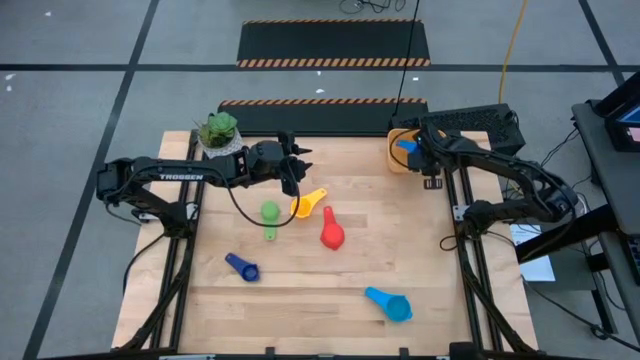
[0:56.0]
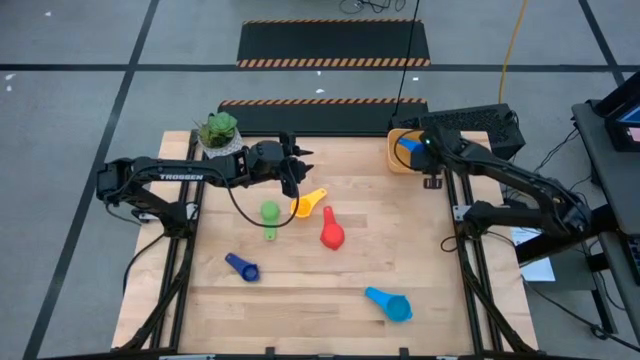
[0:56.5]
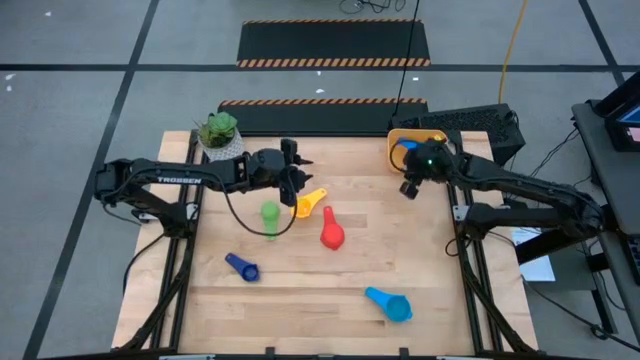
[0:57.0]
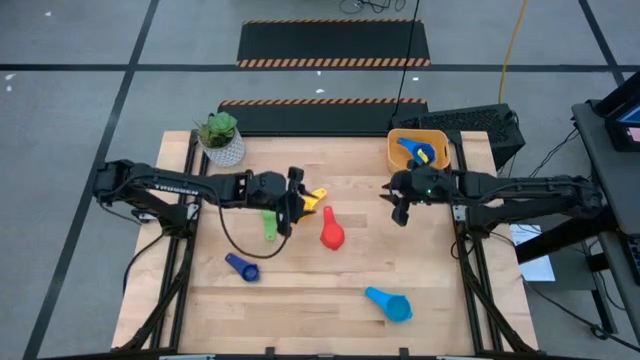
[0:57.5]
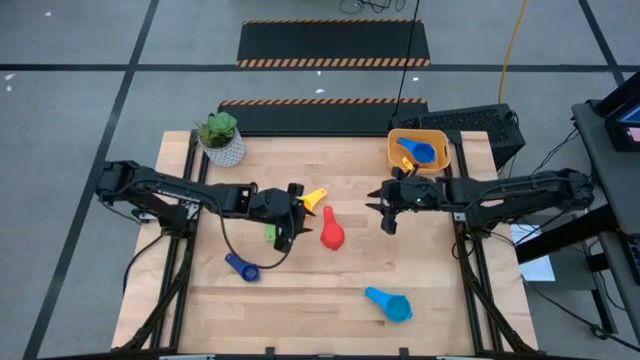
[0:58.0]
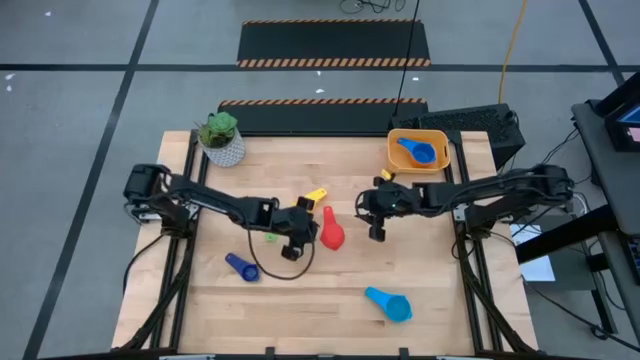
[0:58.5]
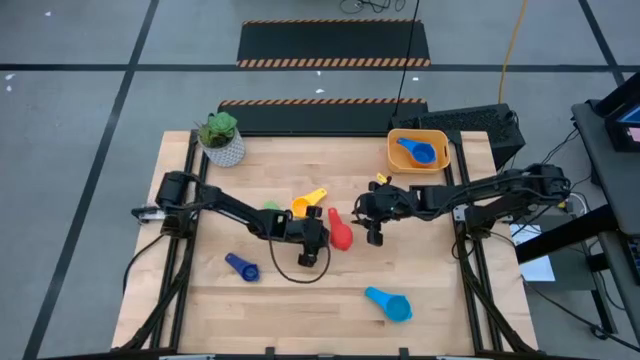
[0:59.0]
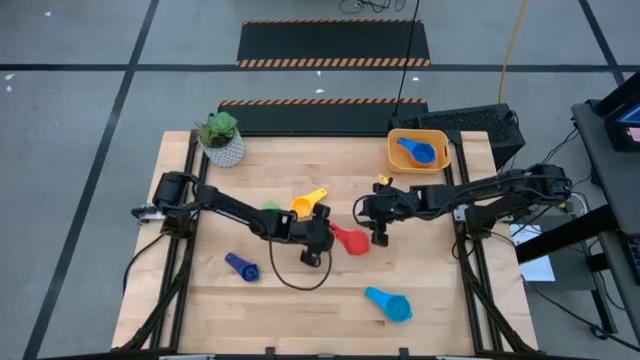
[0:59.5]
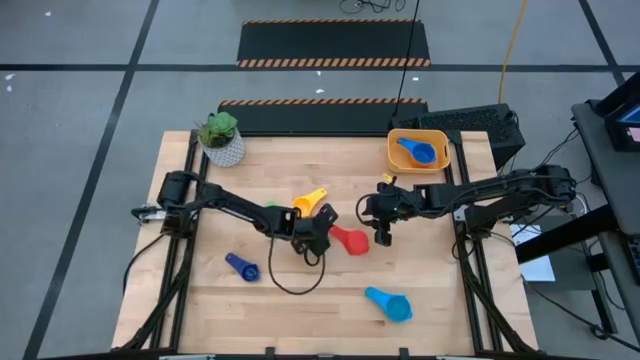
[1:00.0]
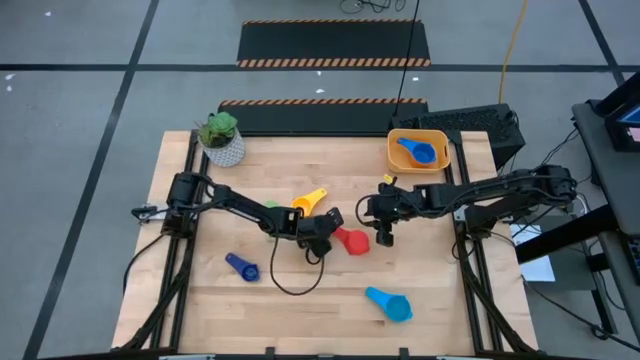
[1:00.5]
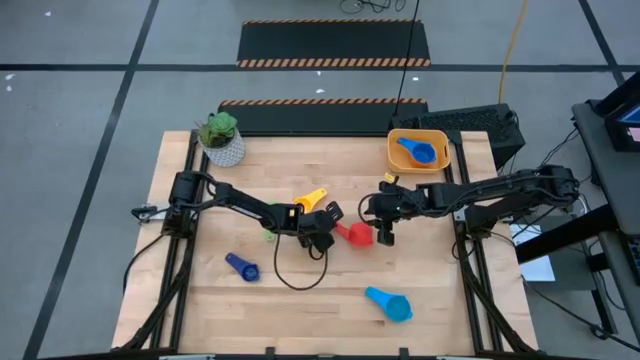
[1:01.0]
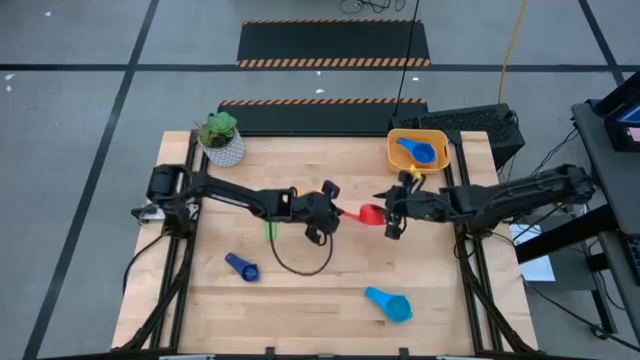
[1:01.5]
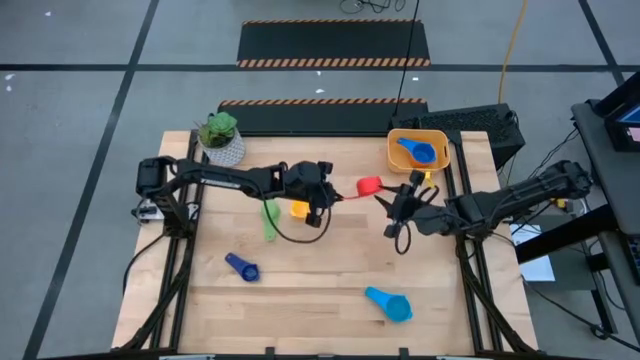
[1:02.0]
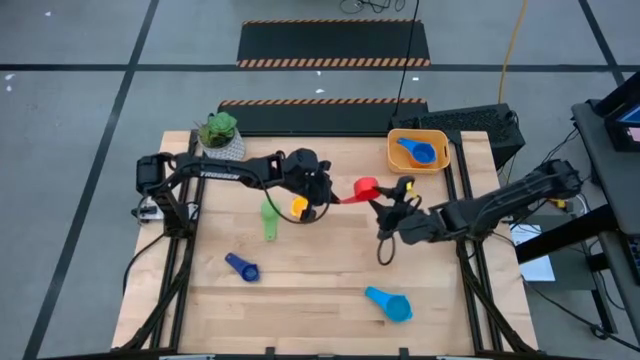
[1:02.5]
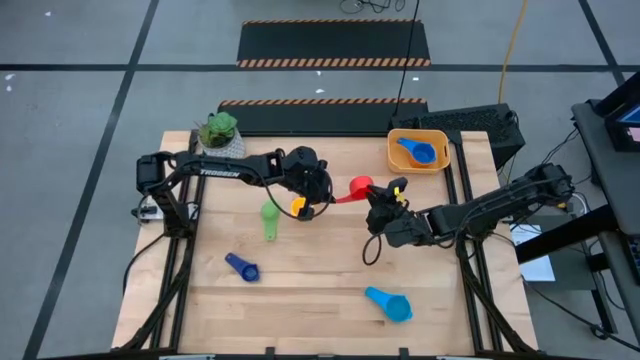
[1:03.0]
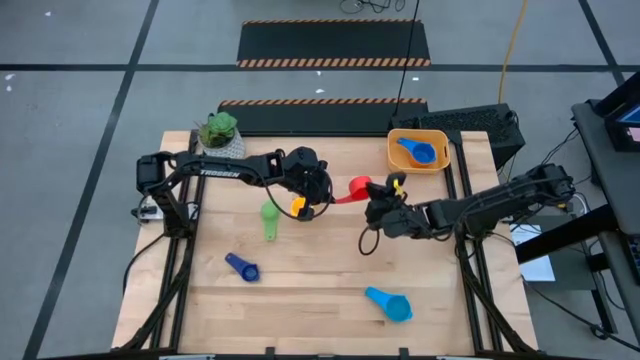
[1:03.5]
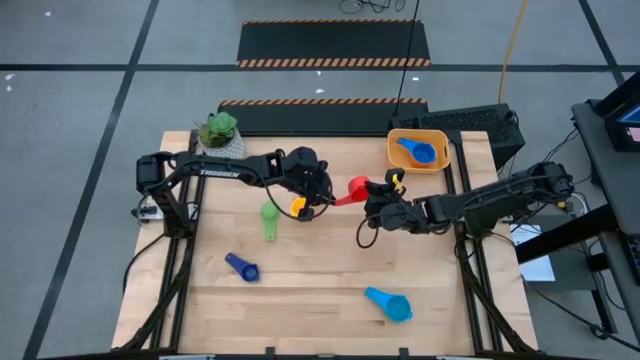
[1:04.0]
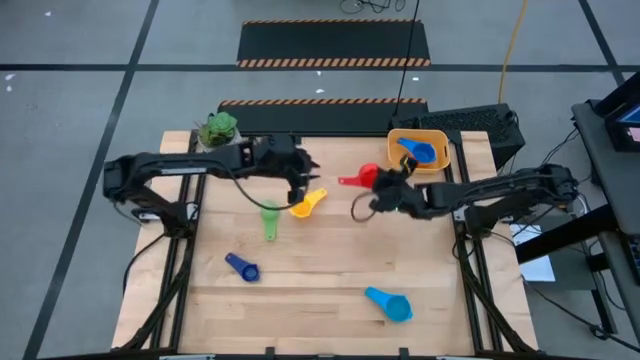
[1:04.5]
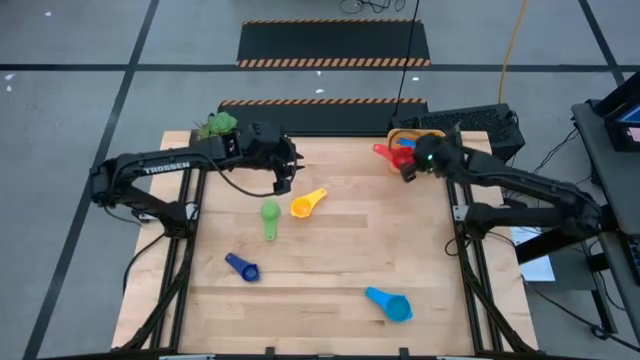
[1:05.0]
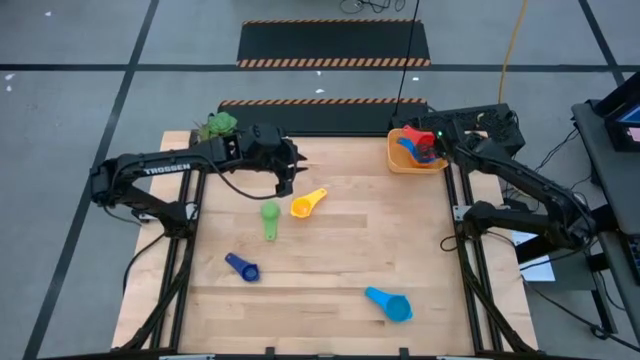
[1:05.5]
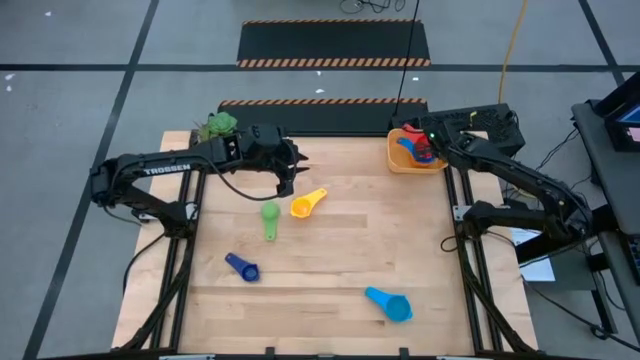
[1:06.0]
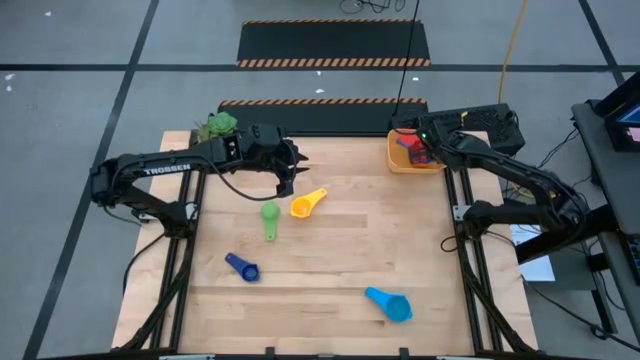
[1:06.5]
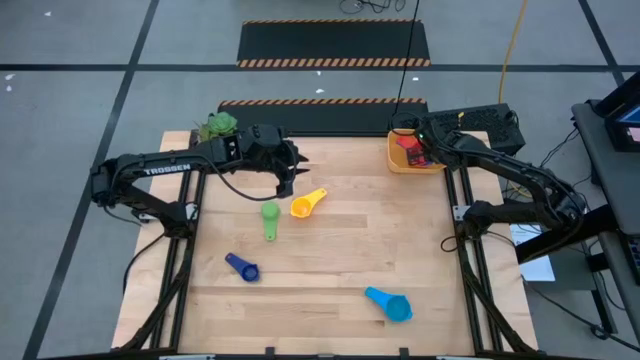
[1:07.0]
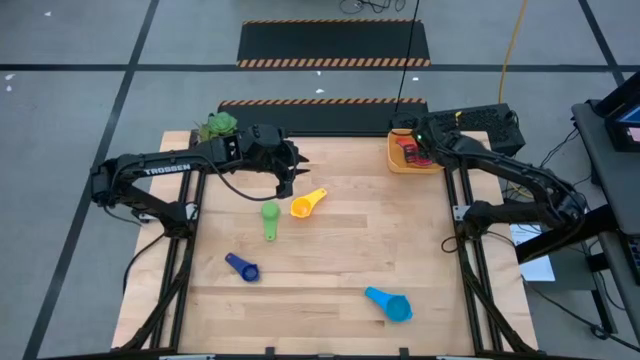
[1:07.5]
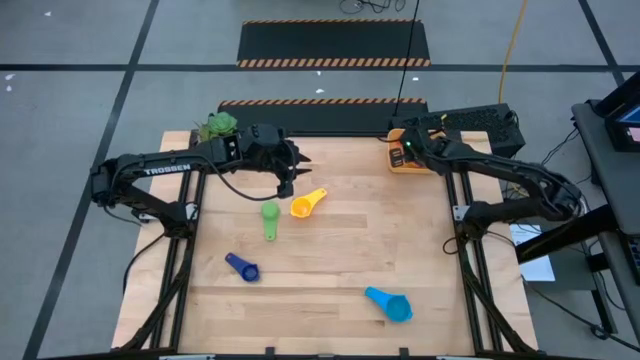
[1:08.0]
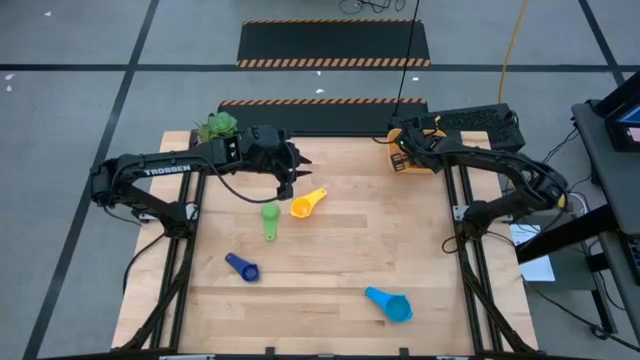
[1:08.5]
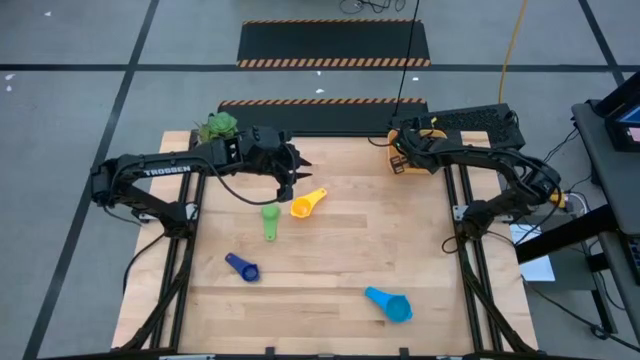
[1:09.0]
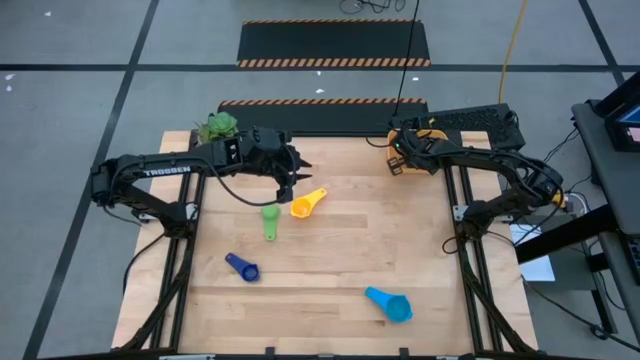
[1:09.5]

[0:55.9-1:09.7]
Task: Nest measuring cups in basket
Stack the red measuring cup on top of the blue measuring cup into the bin

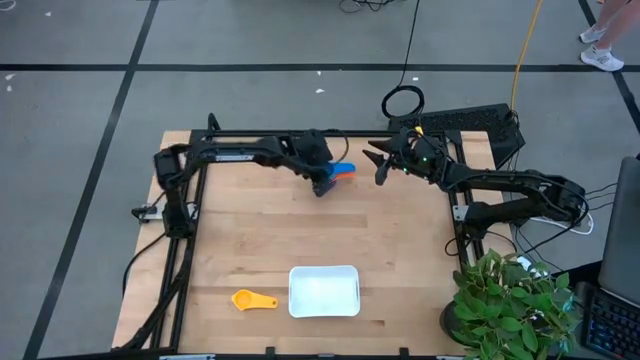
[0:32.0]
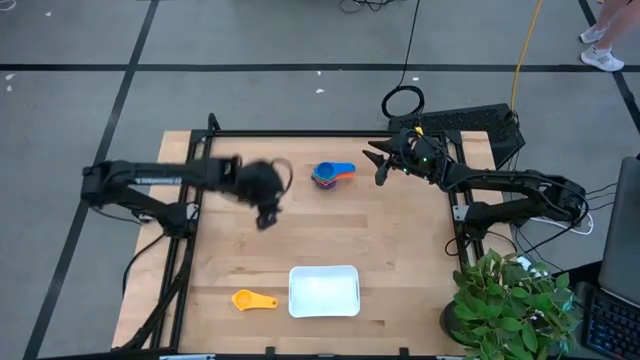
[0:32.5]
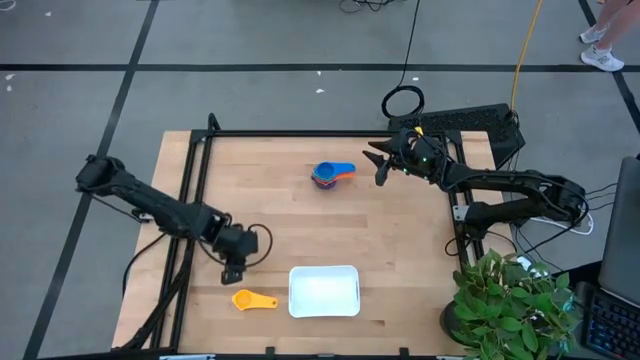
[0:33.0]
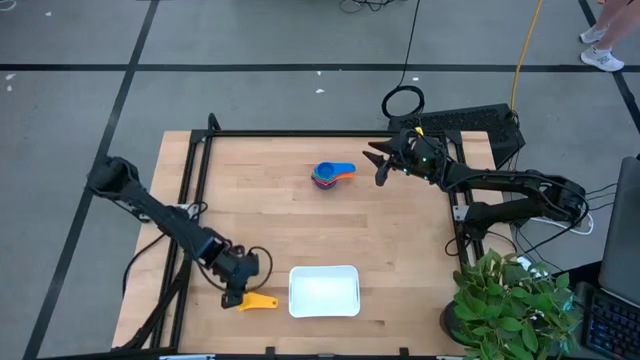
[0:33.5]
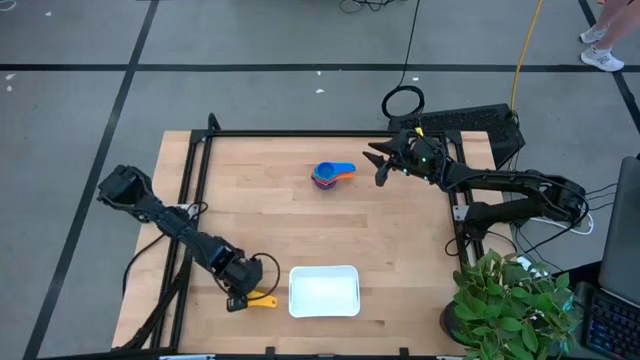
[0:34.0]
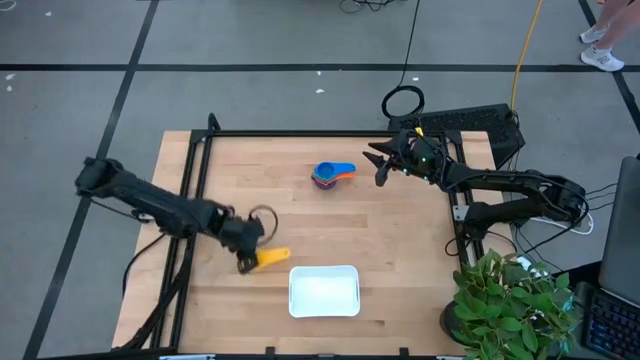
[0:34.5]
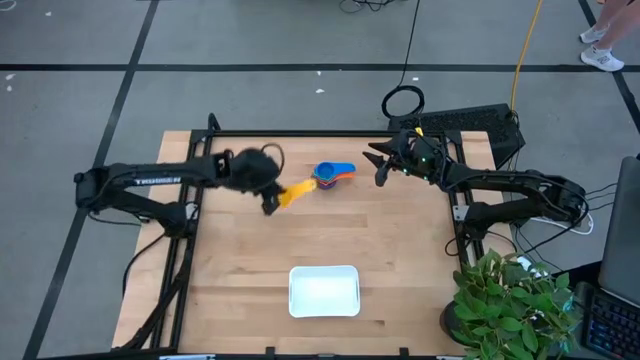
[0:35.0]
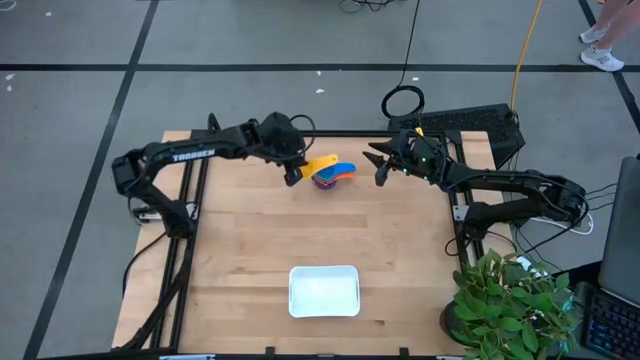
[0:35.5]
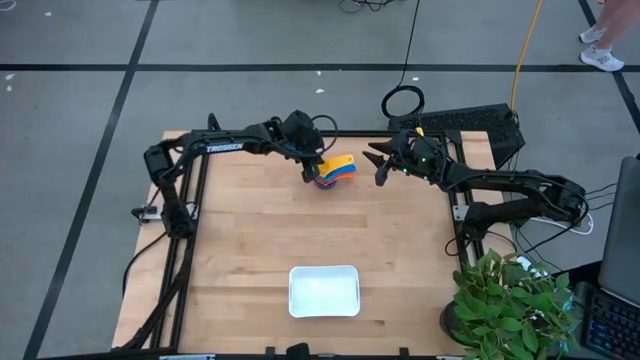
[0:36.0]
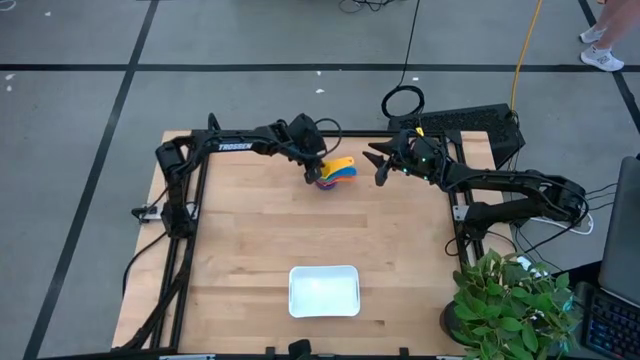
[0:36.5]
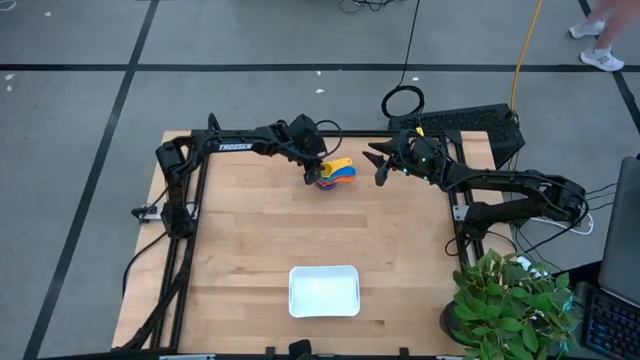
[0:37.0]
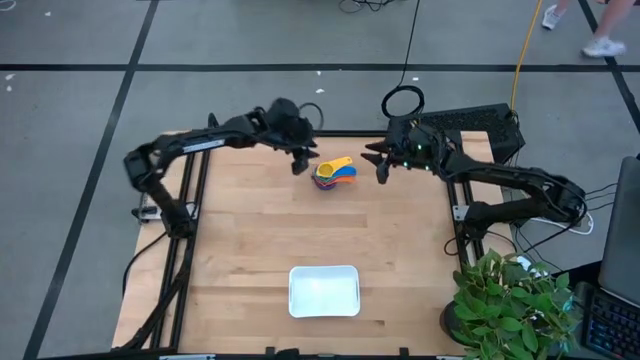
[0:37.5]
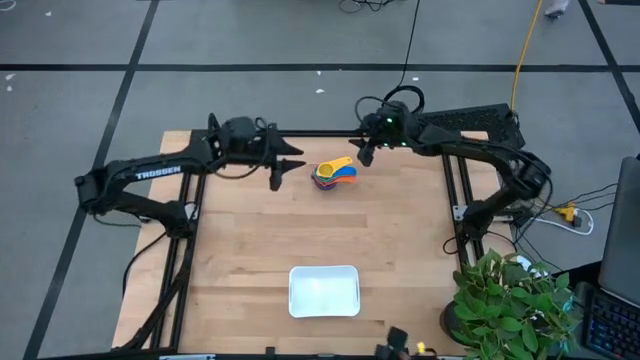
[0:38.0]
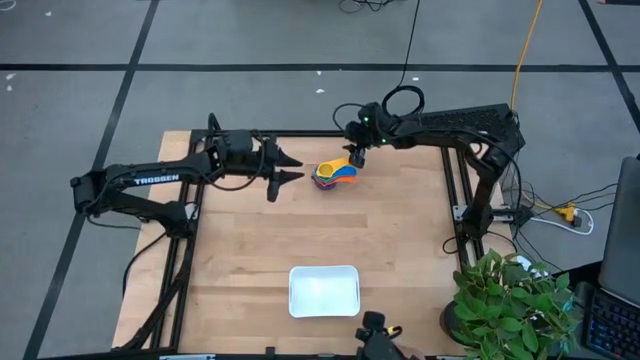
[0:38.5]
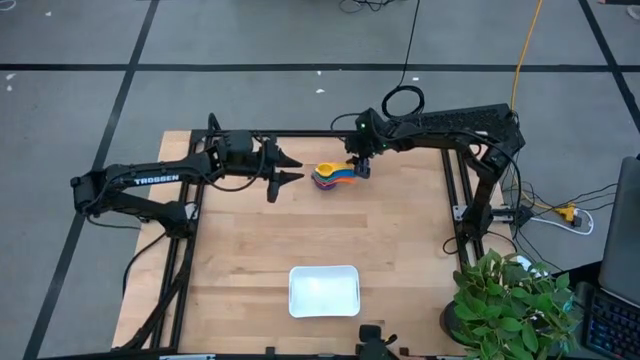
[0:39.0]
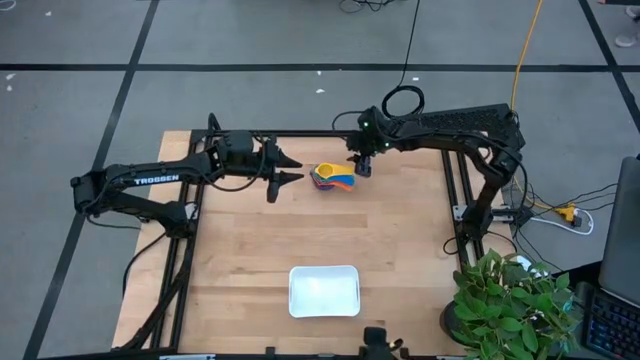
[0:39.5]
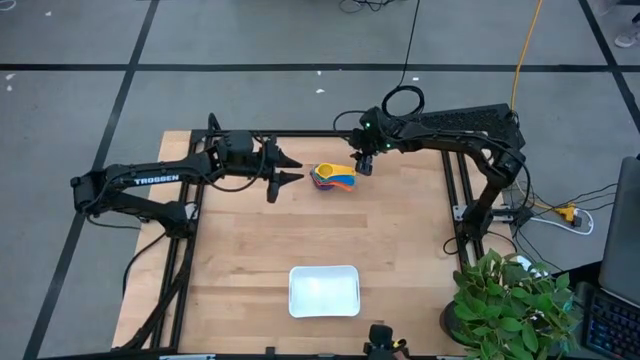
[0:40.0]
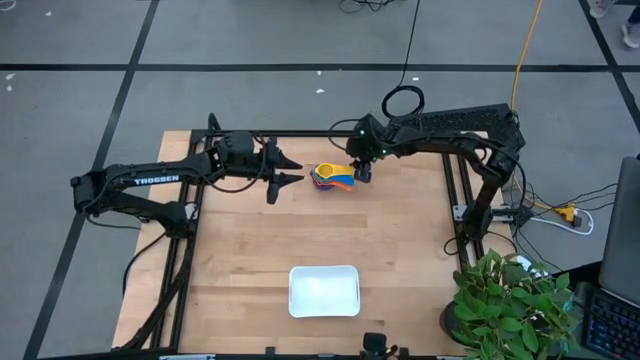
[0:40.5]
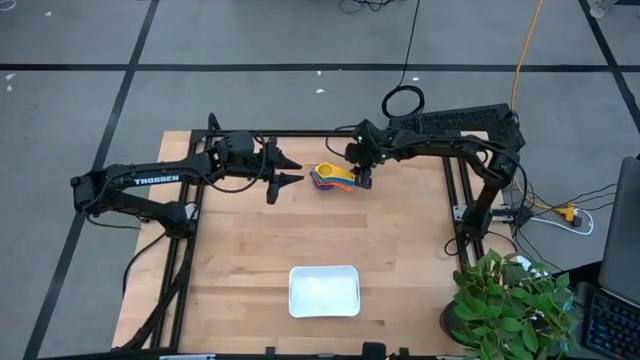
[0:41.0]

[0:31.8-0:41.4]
Task: Nest measuring cups in basket
Stack the yellow measuring cup on the dark blue measuring cup
